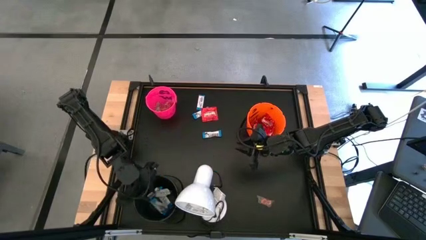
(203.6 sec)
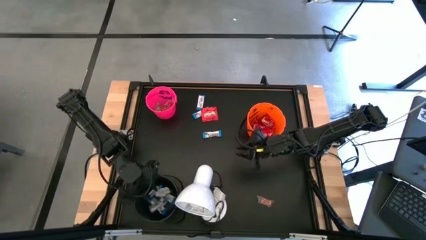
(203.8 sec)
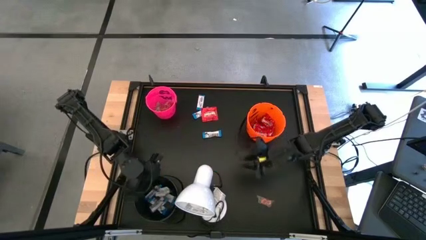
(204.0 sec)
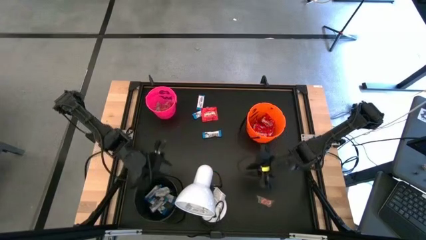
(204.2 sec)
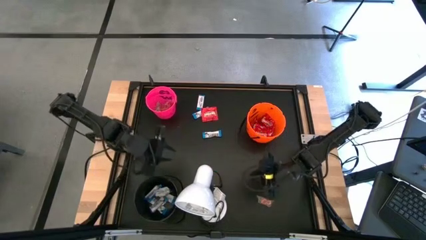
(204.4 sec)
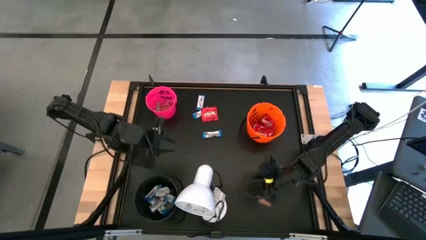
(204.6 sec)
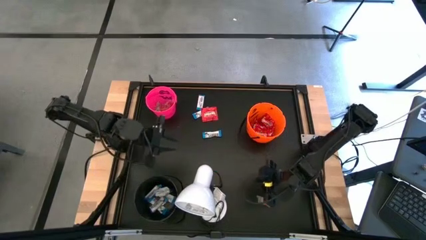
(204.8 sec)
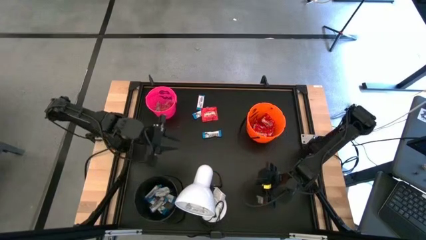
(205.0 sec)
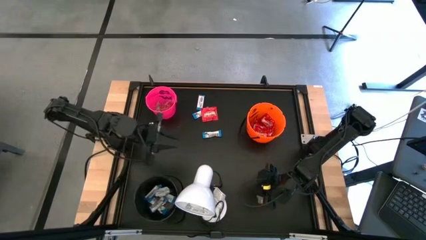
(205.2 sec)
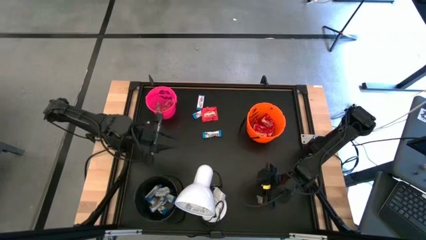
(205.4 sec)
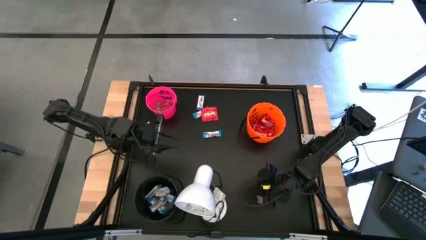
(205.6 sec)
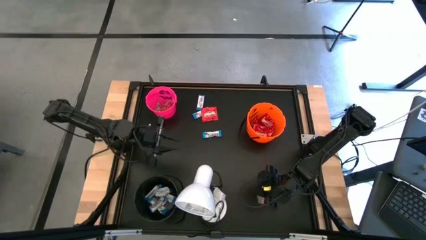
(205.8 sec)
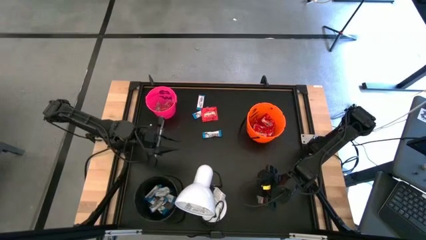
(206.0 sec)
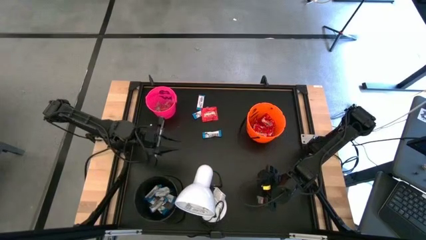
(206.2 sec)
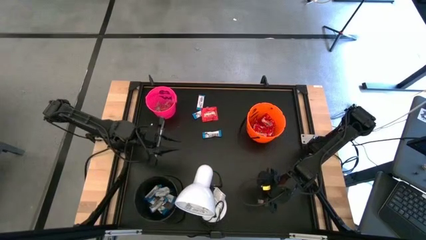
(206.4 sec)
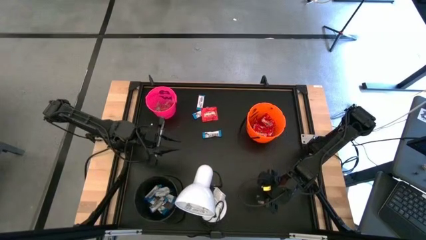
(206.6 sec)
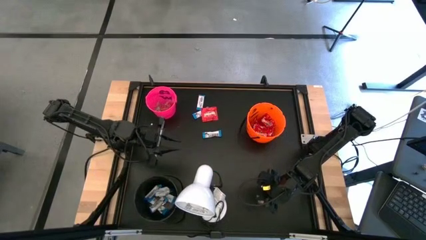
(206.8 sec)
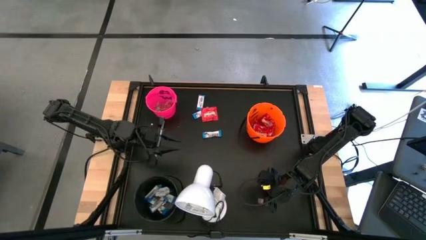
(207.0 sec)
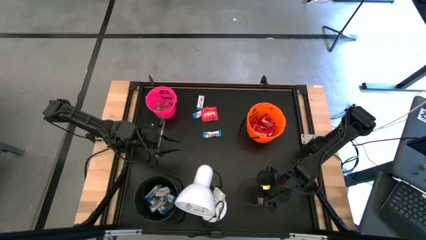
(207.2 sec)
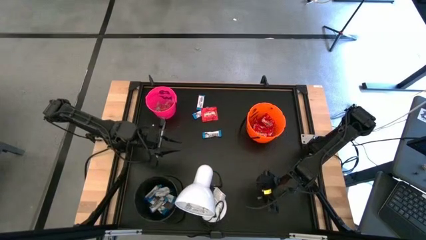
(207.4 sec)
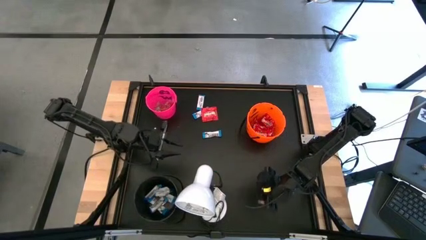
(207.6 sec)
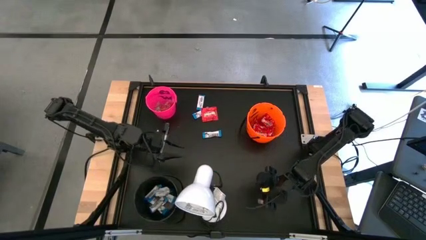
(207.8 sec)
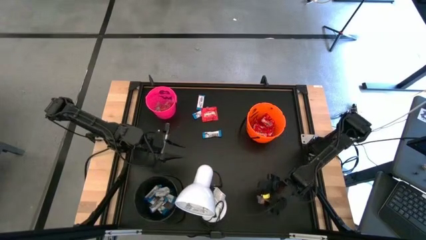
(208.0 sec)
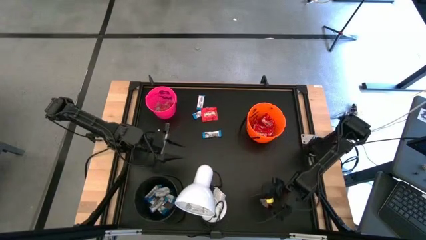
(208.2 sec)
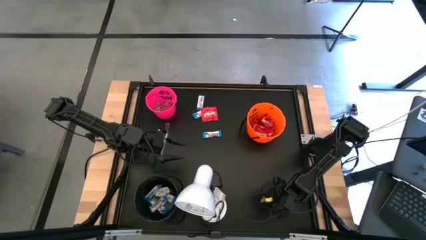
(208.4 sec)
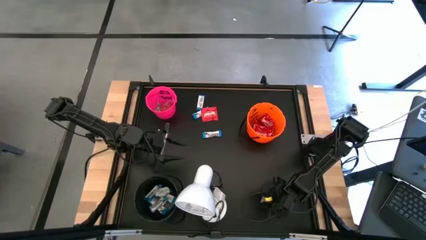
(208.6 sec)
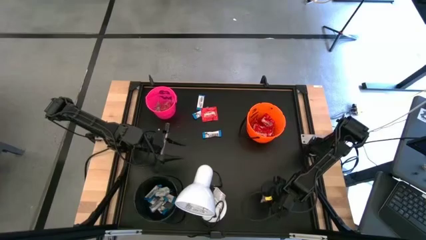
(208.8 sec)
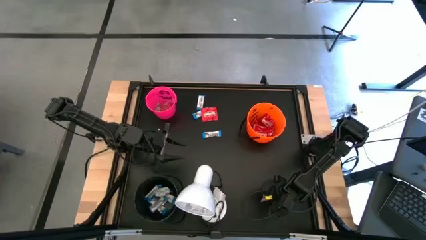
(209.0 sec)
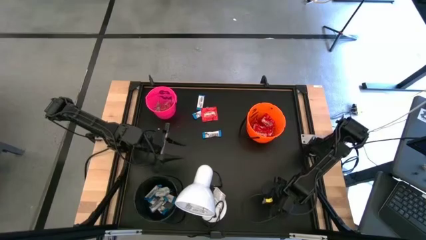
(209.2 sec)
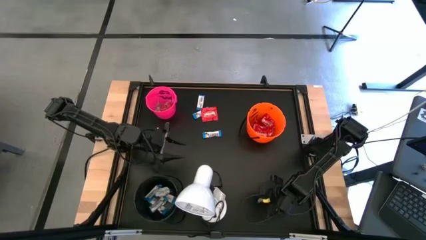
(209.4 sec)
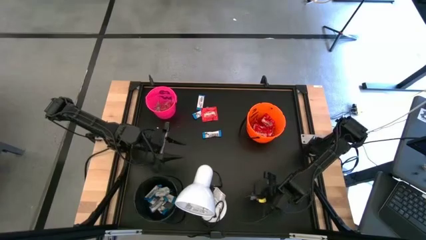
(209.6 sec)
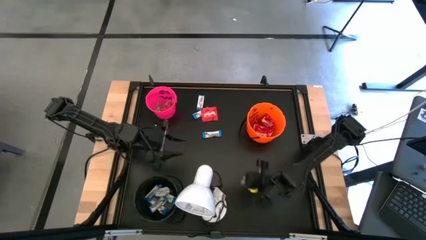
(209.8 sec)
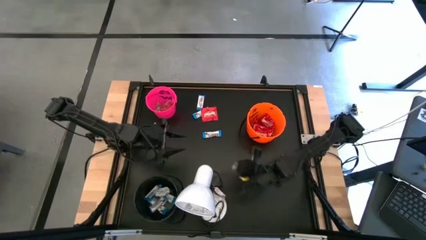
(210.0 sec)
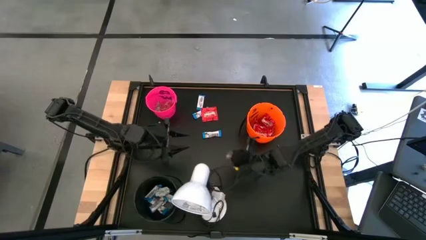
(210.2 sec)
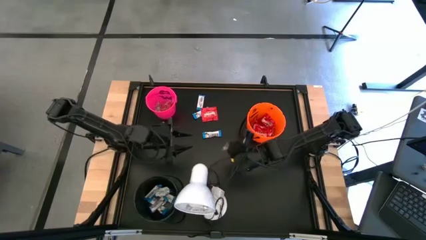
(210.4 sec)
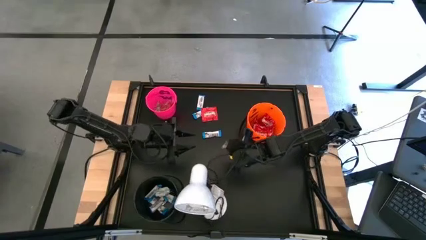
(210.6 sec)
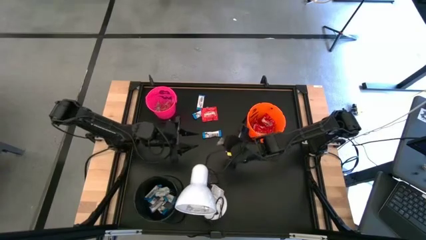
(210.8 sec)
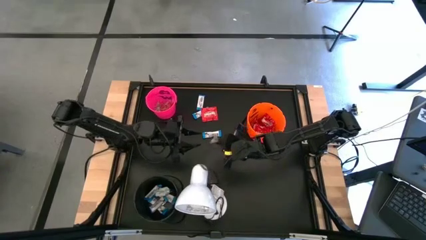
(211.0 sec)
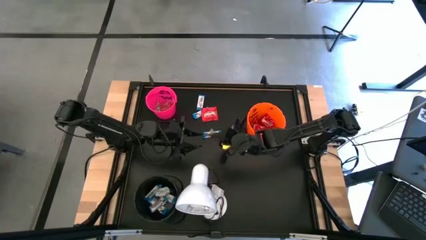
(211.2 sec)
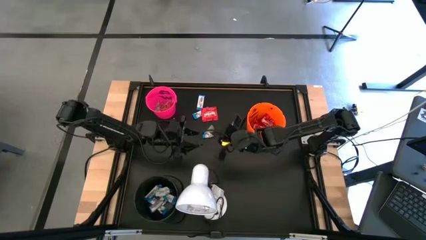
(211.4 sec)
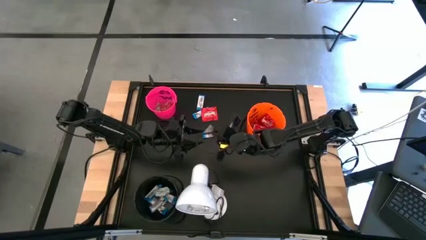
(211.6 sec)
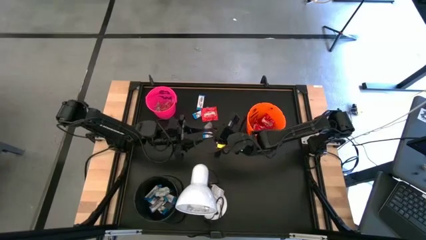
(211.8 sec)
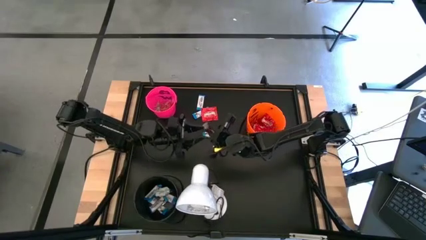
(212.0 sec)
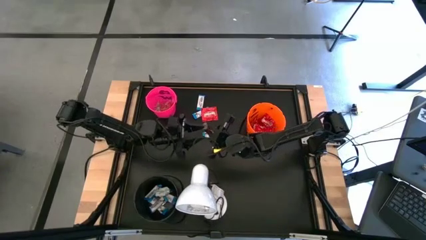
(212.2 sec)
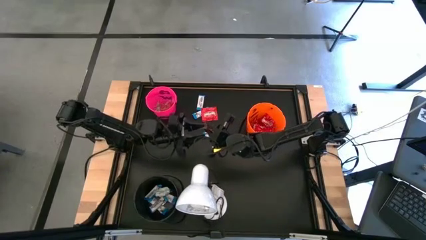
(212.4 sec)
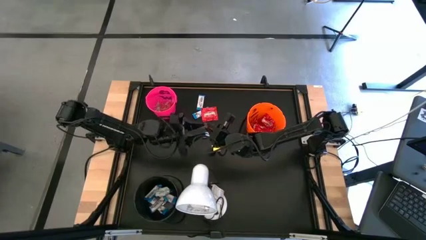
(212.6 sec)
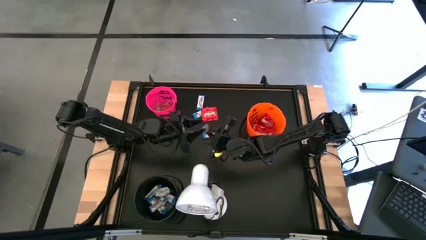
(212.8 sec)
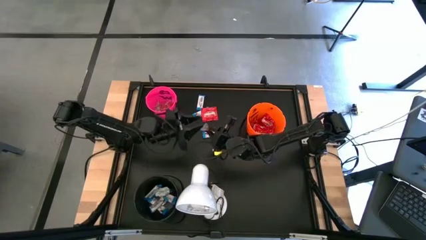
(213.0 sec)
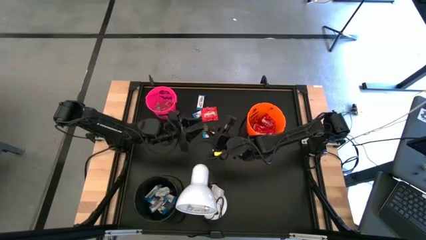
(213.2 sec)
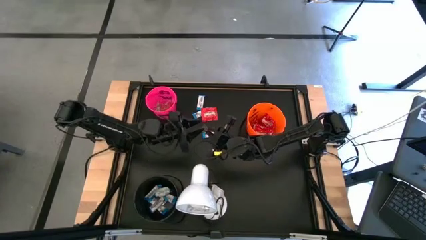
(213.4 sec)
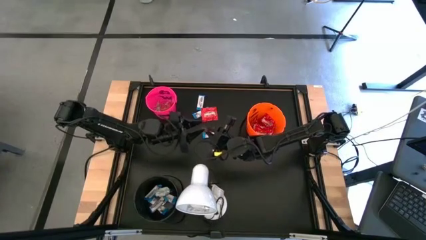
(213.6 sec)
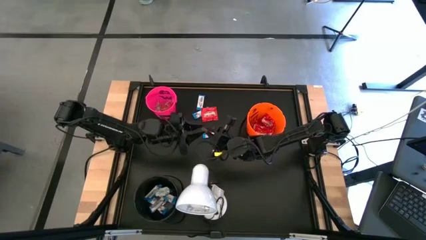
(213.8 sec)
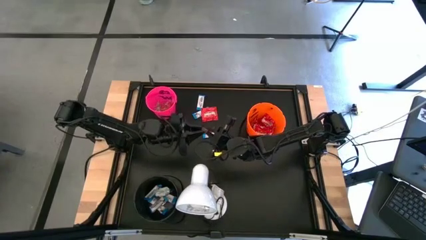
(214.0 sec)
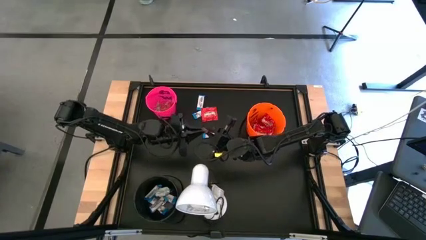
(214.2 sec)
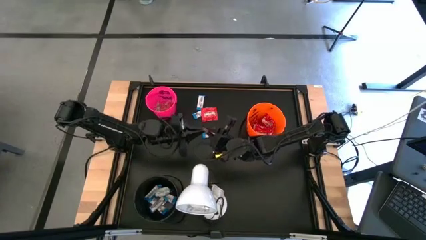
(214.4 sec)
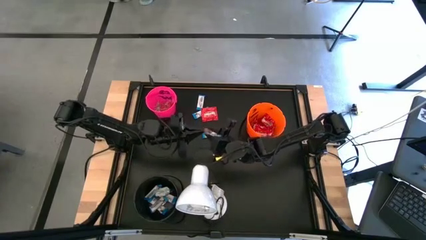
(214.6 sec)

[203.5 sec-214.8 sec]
Task: Sort candy
Put the orange gummy into the pink bucket

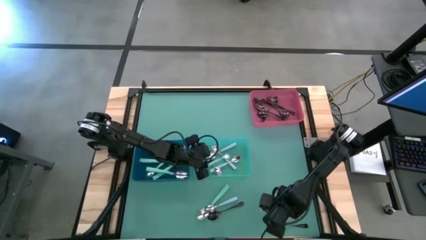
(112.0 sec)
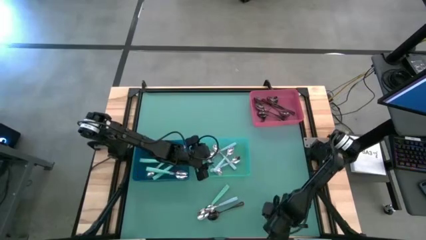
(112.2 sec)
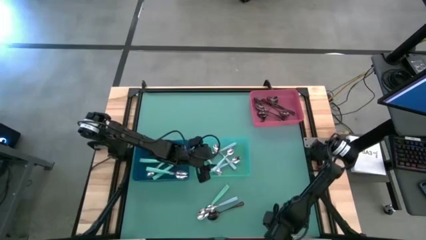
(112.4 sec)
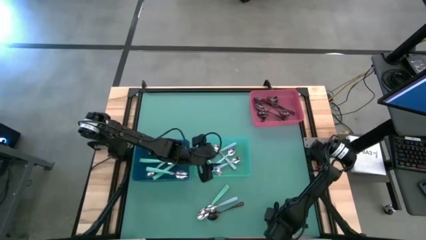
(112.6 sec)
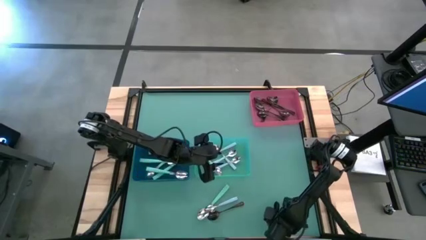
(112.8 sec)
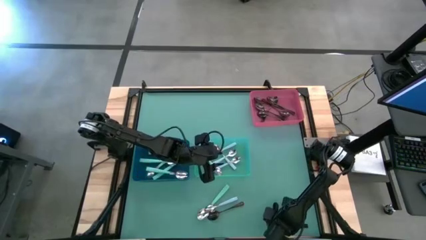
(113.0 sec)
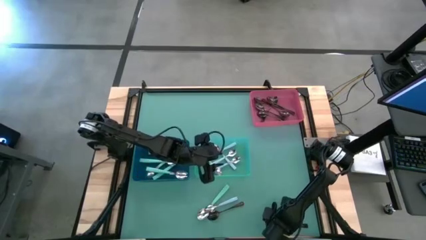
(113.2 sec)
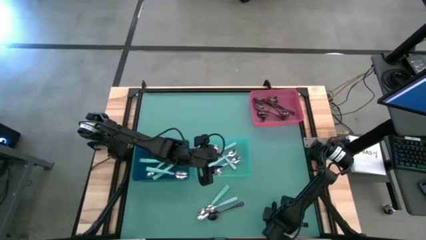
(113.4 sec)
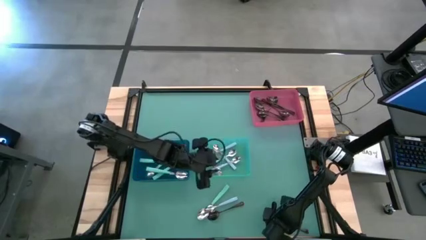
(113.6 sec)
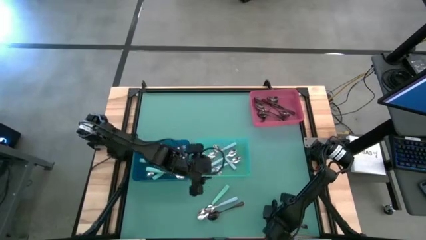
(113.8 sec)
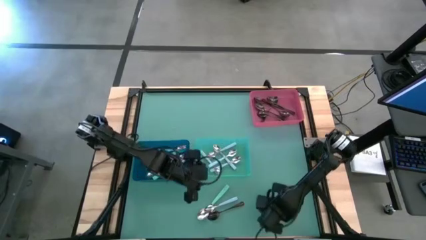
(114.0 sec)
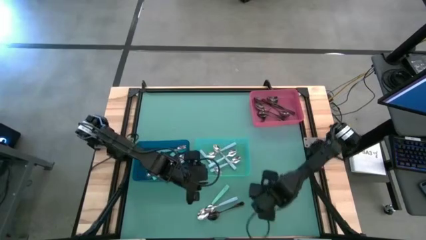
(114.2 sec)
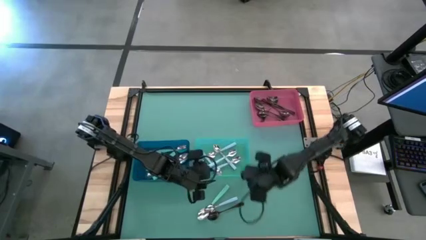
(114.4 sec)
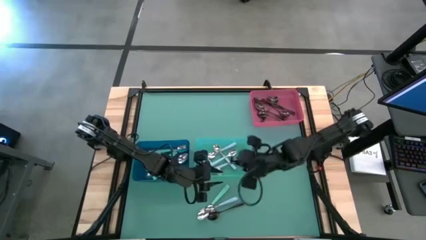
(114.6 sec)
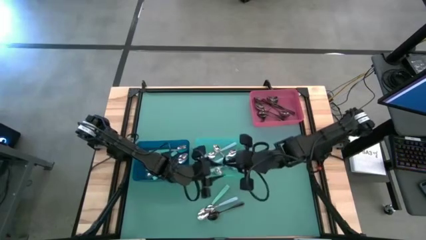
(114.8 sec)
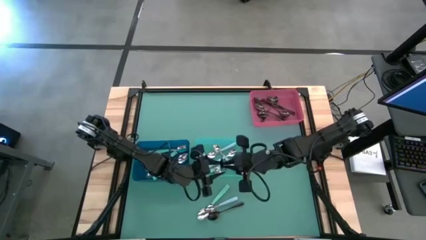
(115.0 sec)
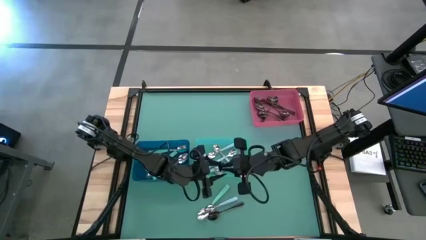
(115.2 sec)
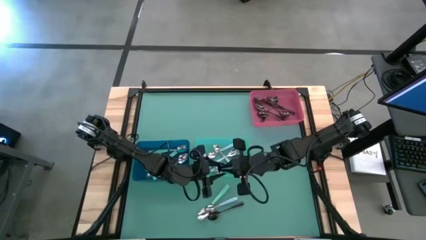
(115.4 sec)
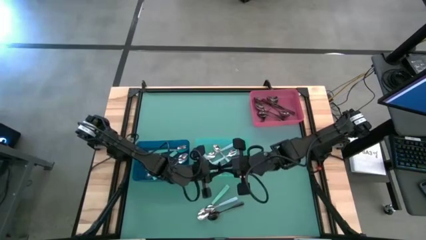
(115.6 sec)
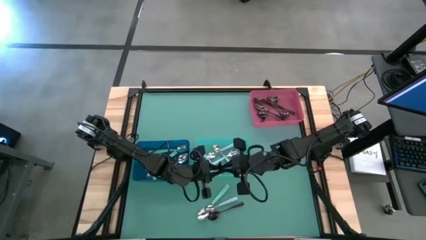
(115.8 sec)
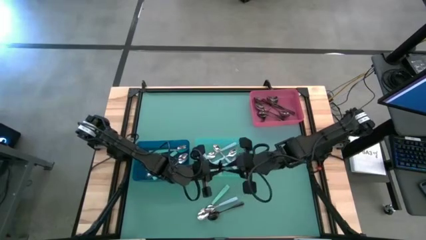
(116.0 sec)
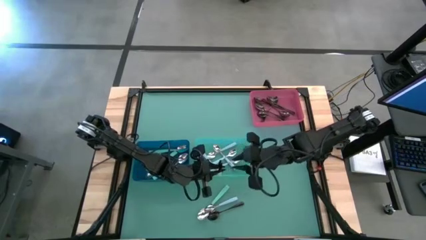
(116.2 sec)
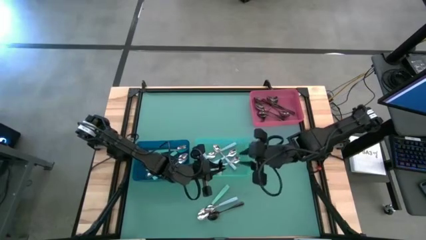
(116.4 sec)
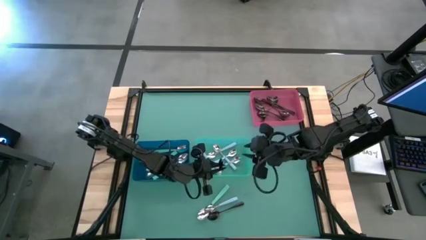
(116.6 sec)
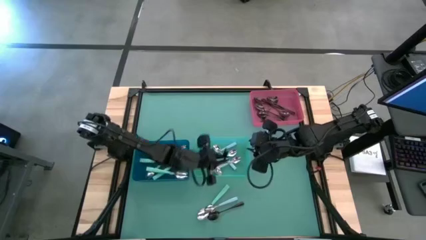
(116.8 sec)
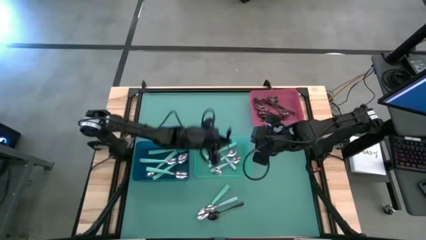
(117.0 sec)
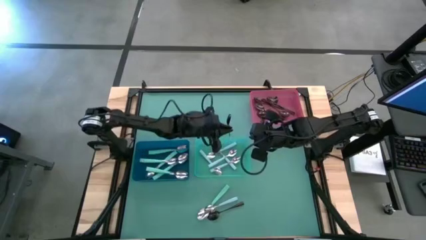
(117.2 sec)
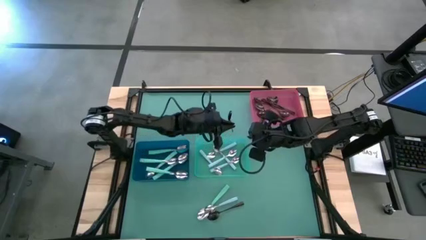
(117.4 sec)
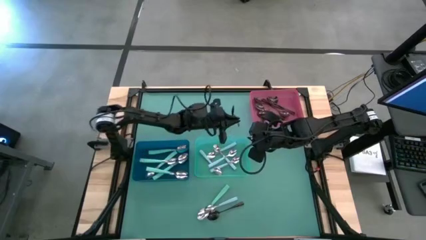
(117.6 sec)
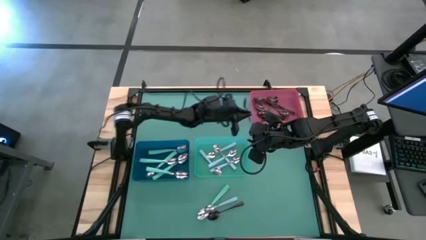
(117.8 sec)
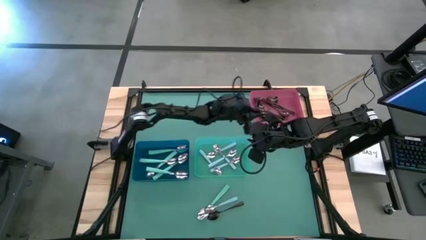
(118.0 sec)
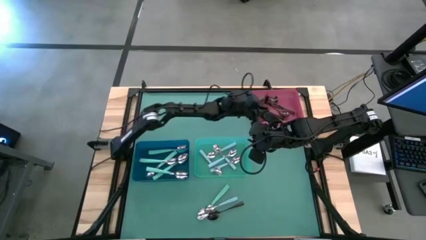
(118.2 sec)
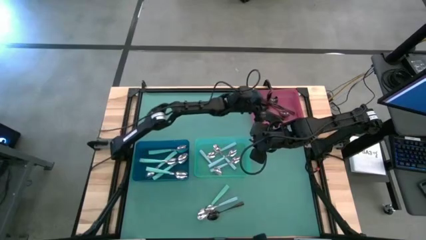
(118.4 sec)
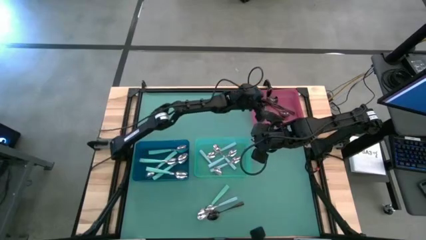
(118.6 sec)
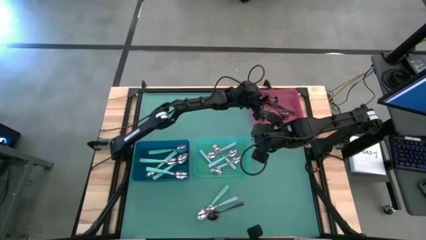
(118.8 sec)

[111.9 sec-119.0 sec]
Task: Sort silverware by color (type)
Put the black spoon into the pink bin
